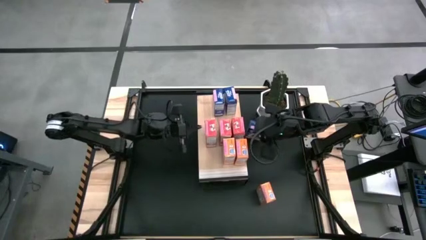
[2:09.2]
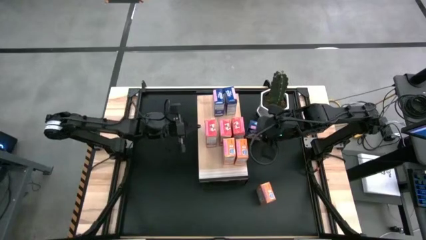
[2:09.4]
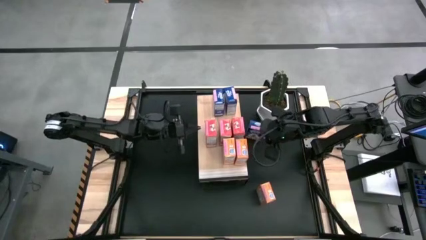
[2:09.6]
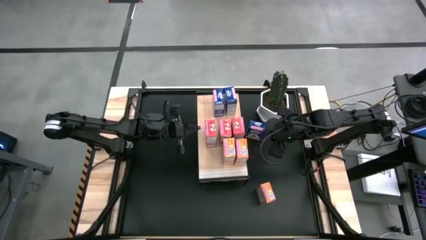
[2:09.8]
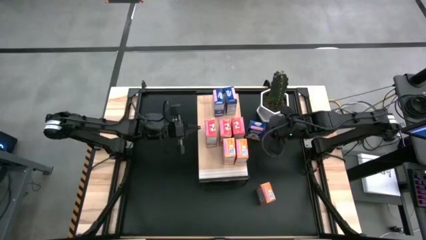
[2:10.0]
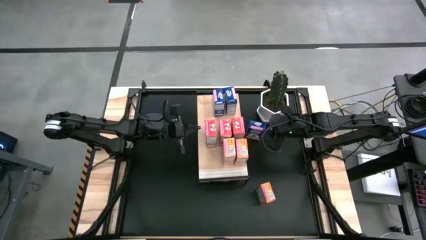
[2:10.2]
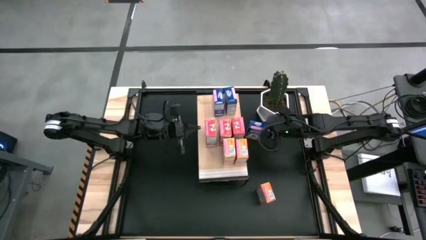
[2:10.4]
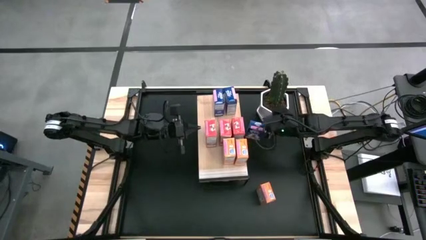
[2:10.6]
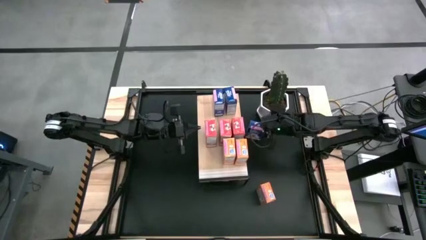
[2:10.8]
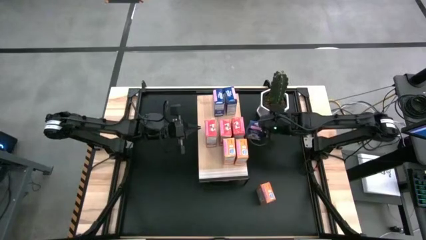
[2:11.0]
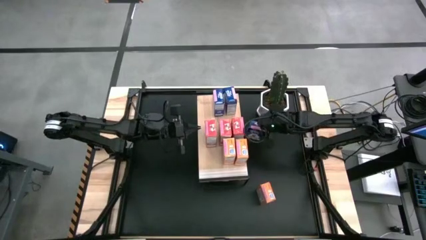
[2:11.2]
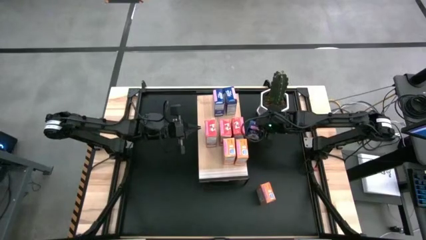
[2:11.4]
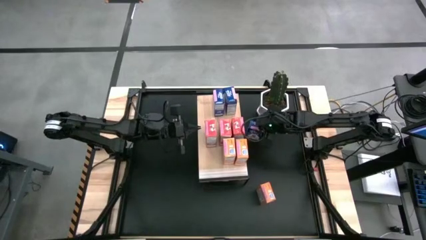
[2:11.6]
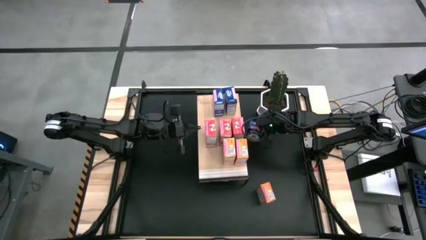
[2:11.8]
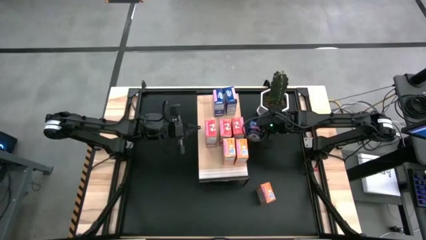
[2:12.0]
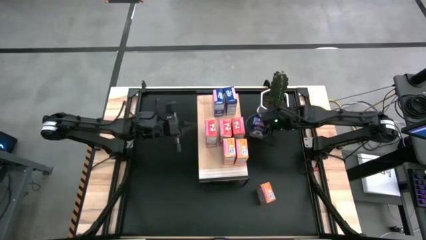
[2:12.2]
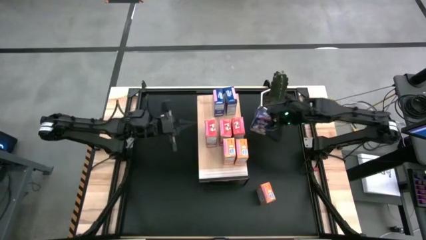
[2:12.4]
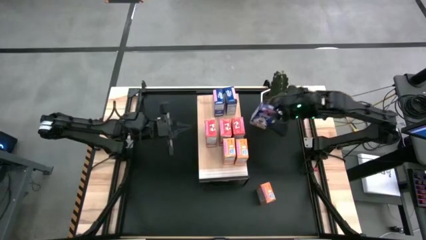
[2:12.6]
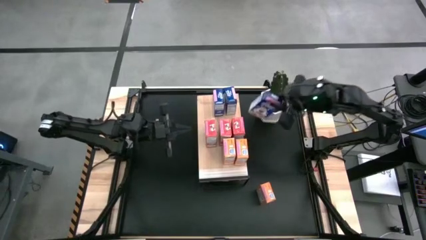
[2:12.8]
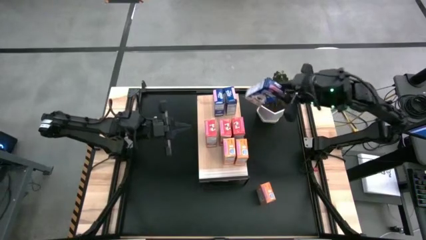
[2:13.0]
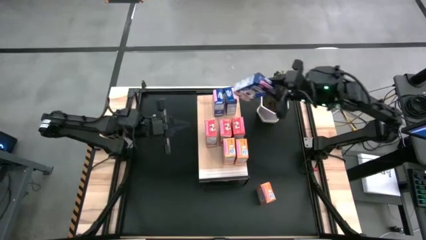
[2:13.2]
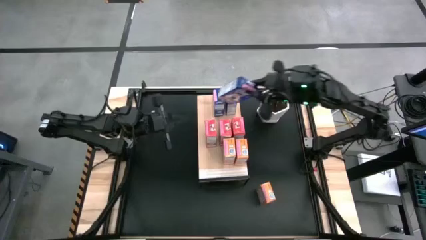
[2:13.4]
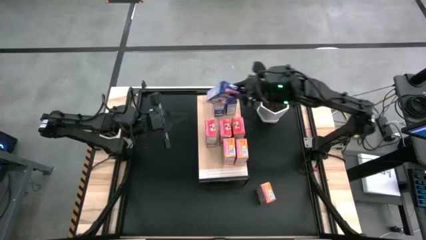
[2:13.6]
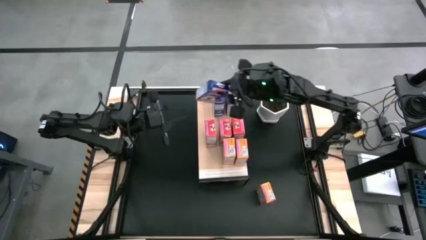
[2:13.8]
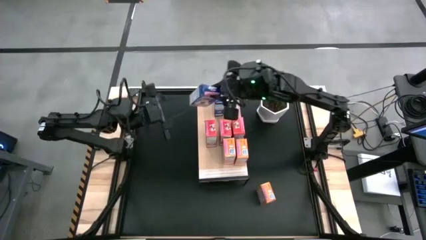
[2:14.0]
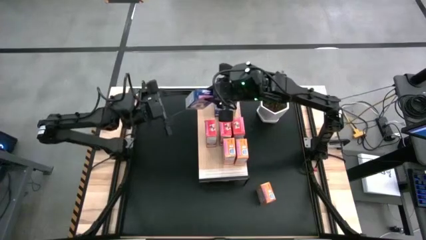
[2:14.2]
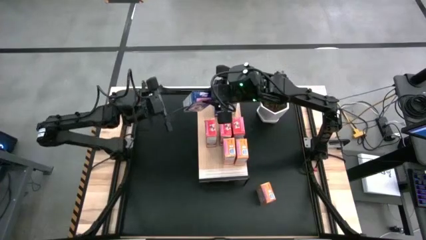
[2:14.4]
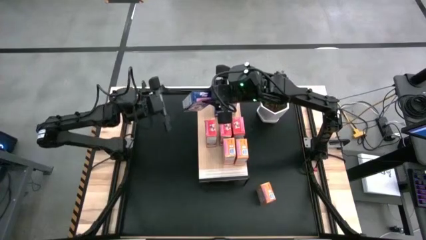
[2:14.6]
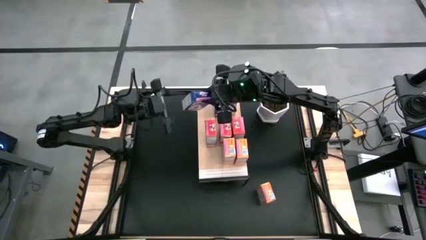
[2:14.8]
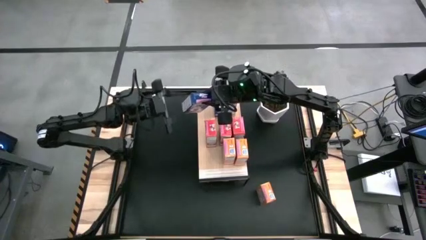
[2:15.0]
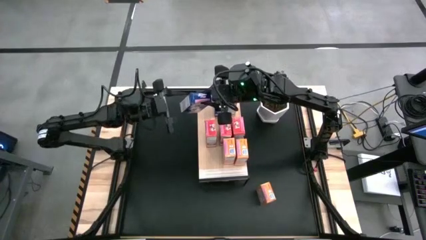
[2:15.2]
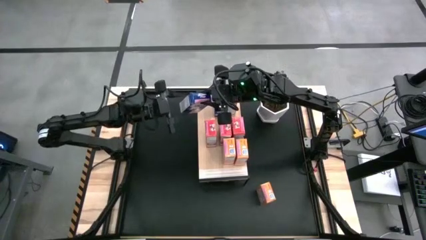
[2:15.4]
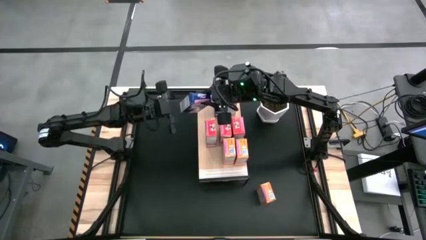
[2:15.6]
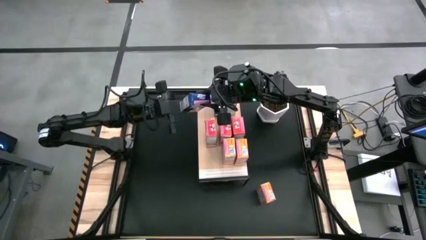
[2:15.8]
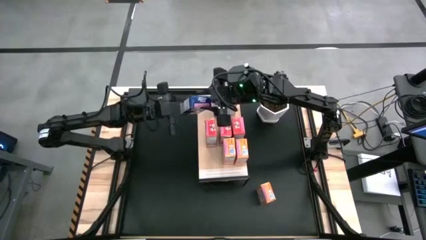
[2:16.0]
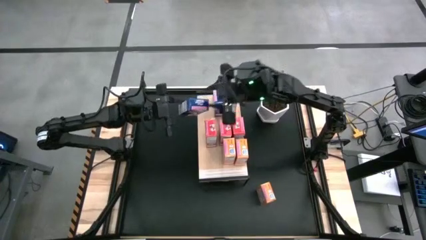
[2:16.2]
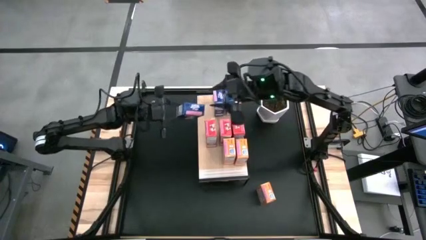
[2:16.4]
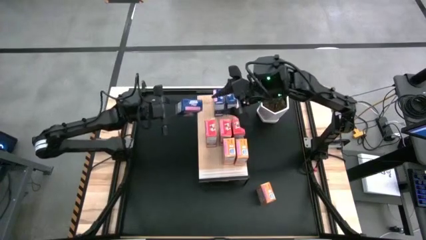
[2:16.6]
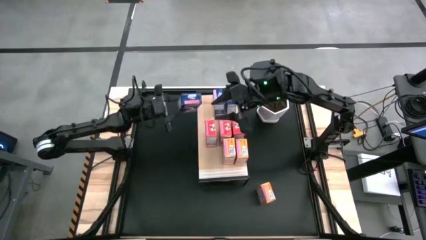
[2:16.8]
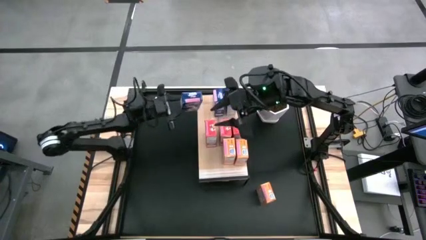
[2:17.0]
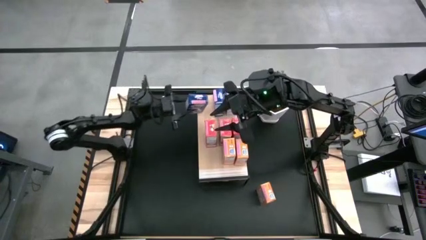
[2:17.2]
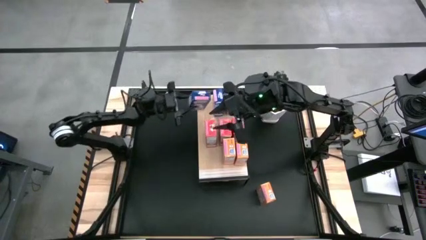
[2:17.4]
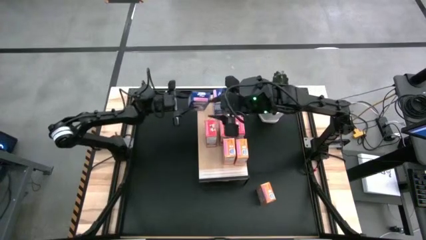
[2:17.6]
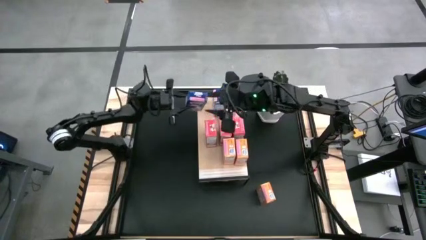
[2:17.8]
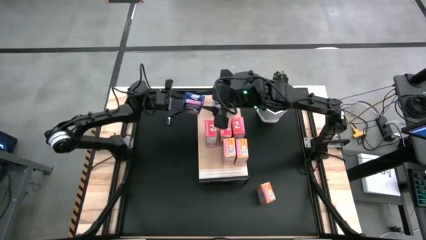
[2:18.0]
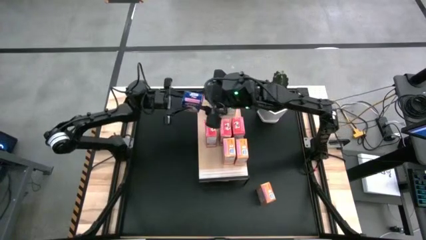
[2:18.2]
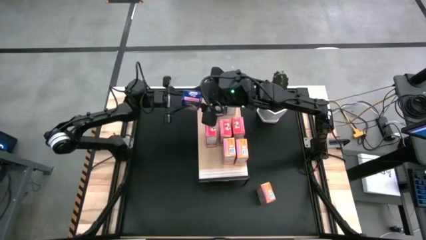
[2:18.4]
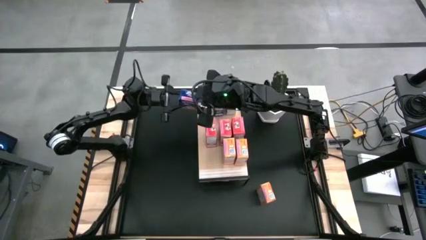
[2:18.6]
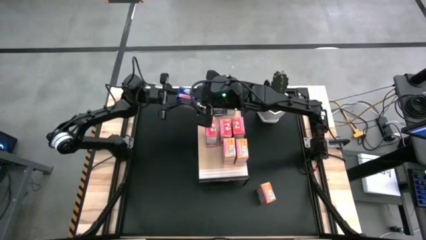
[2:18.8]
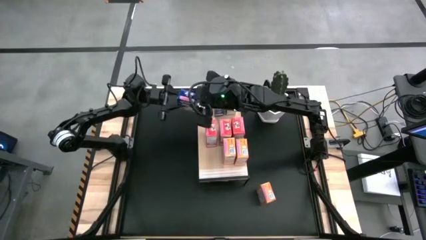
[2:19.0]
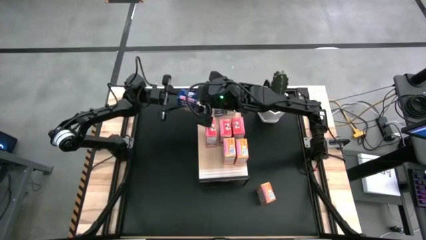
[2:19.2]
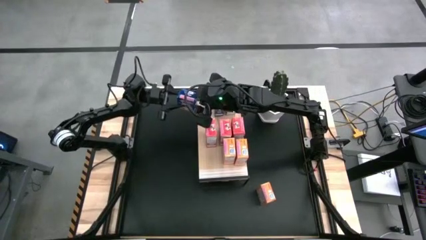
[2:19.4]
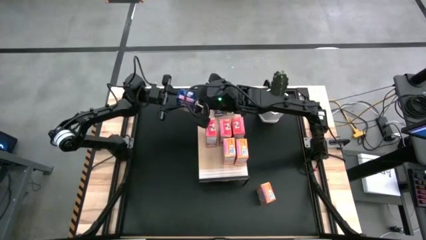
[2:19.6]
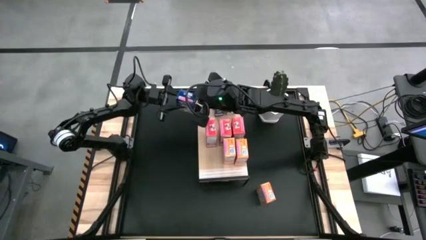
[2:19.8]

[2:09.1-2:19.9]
Task: Stack cereal on shelf
Put the blue cereal box aligned with the other red cereal box on the shelf

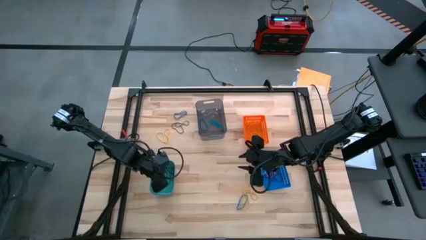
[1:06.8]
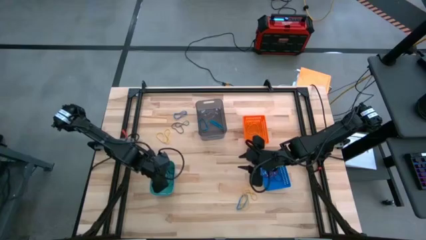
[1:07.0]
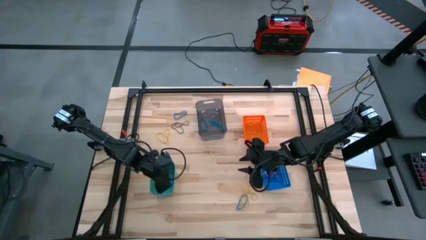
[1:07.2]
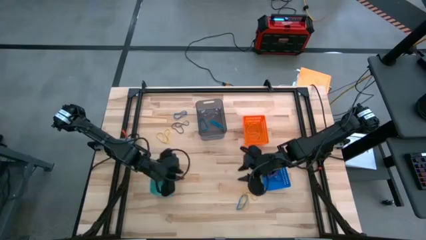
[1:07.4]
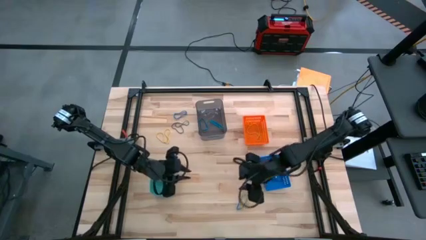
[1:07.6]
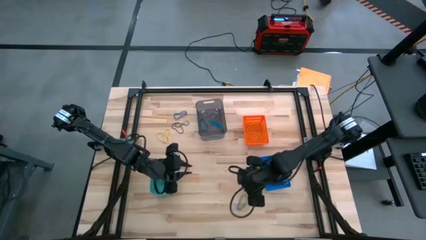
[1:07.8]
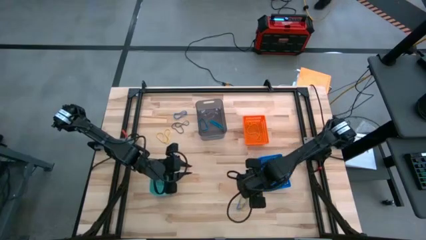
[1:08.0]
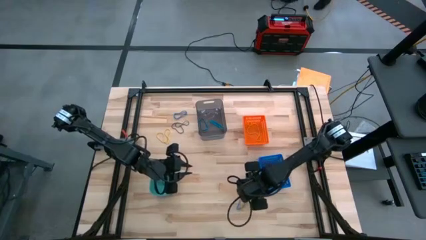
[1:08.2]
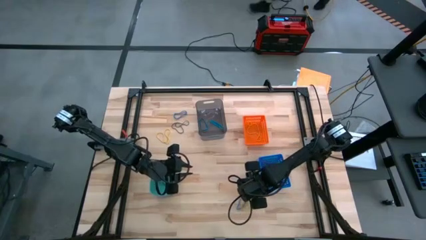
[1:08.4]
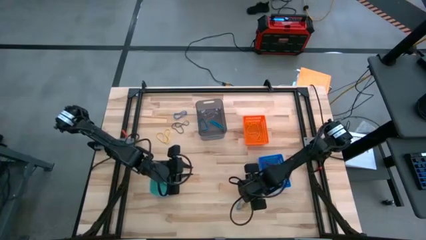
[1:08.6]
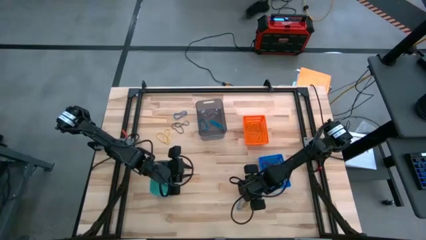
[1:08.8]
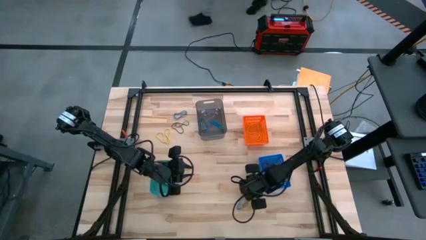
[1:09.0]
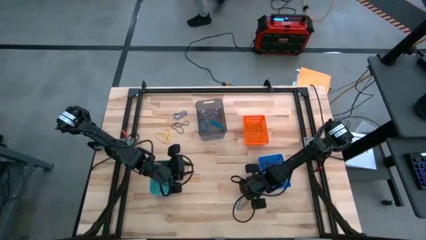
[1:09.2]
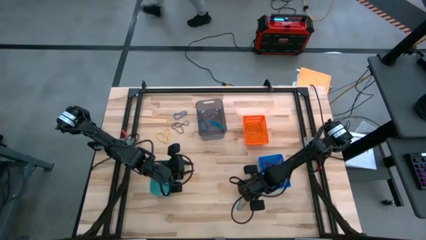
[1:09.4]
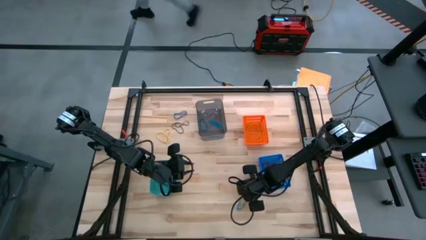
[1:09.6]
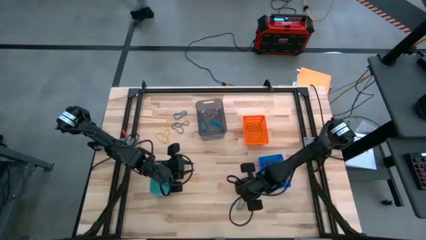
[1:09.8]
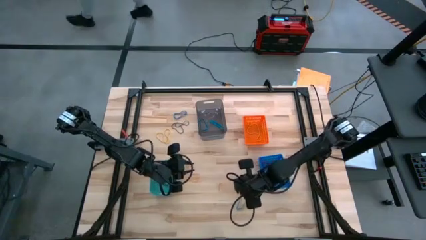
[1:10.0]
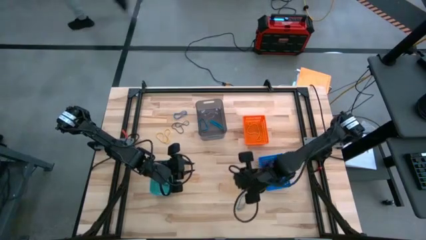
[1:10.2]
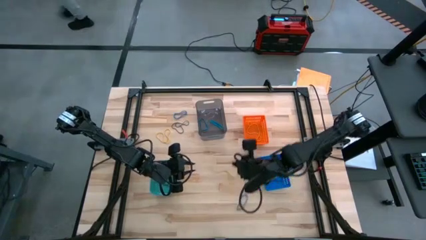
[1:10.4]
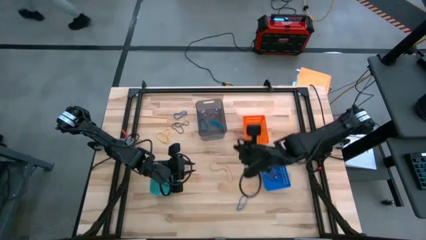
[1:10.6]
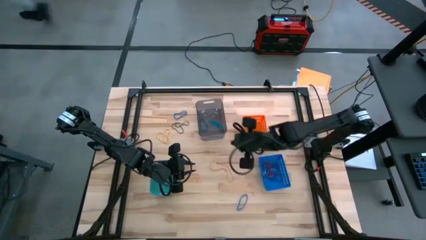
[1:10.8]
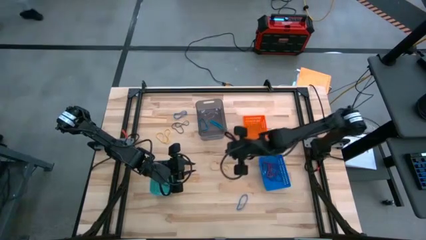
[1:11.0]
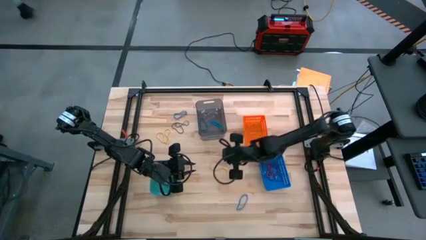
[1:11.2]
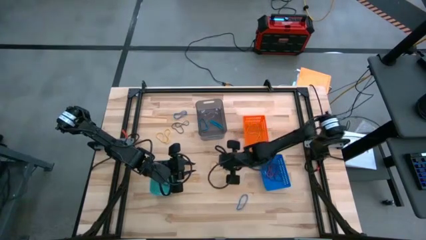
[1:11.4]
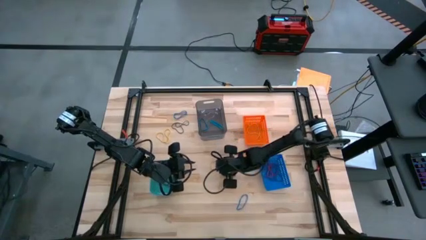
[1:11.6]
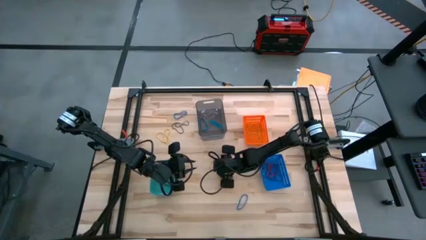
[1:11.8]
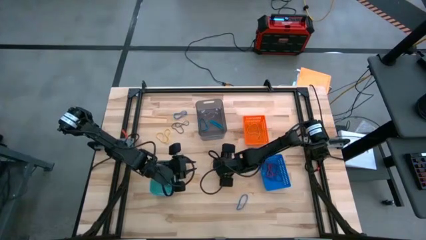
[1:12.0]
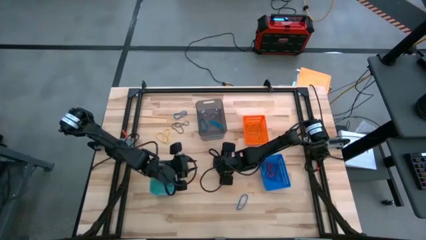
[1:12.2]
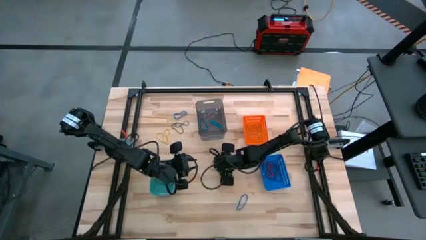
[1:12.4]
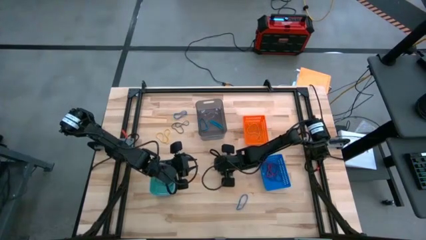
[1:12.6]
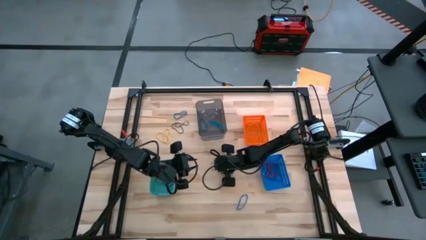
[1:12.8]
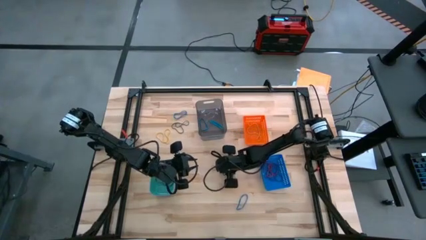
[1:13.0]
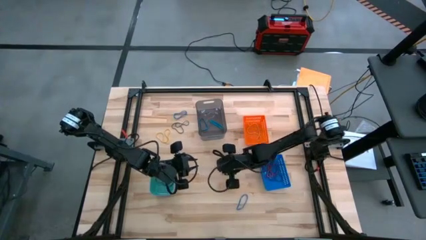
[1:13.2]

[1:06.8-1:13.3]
Task: Sort rubber bands into baskets
Put the yellow rubber band into the orange bin
